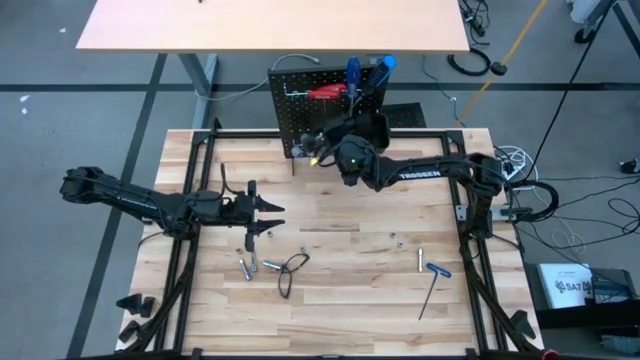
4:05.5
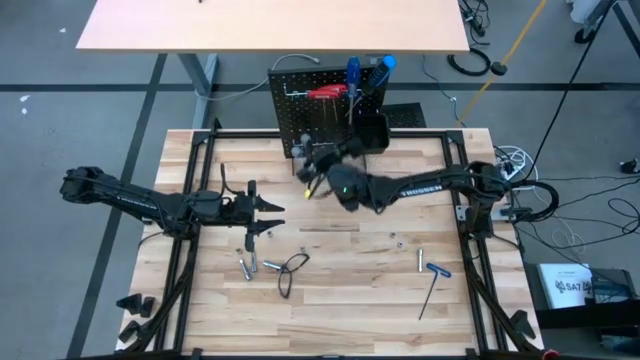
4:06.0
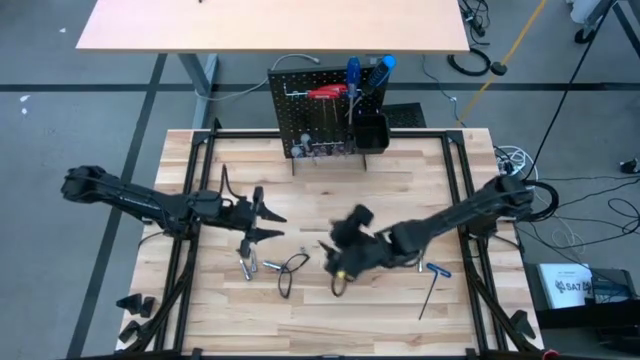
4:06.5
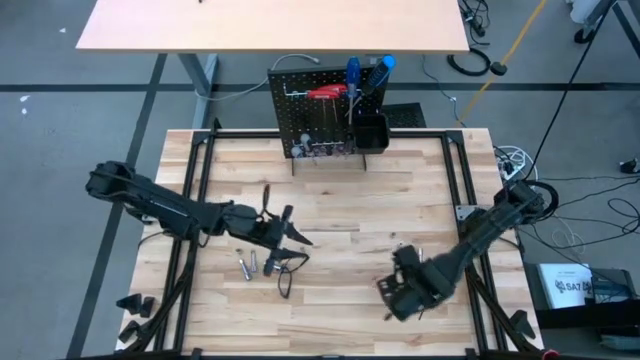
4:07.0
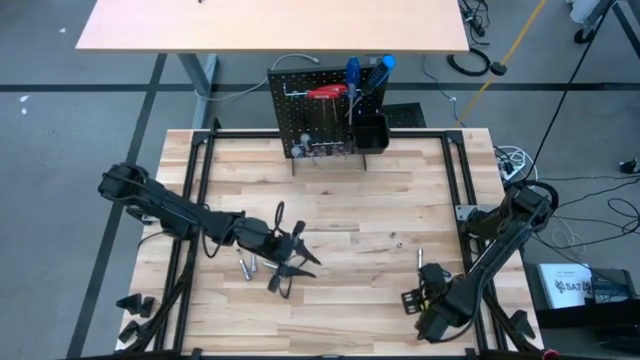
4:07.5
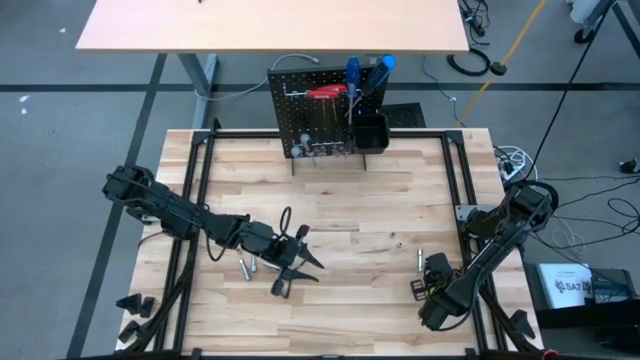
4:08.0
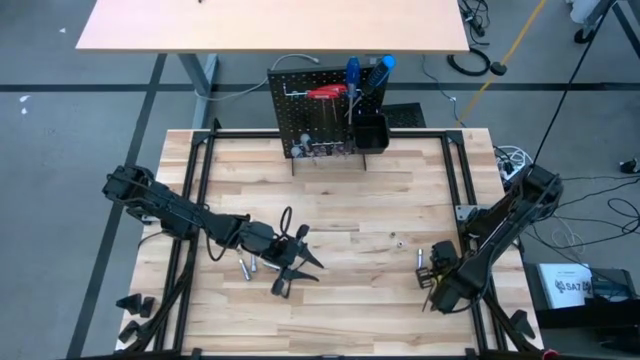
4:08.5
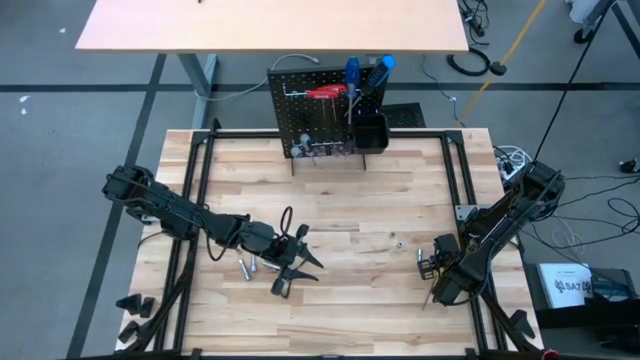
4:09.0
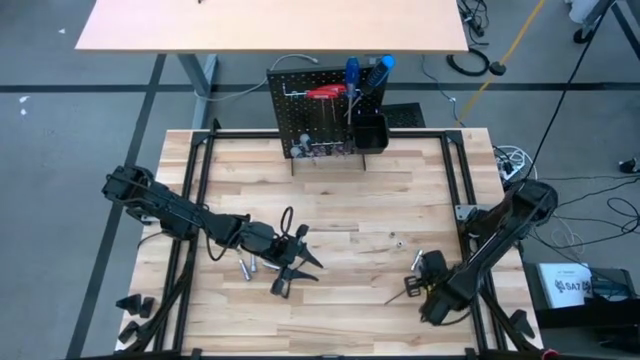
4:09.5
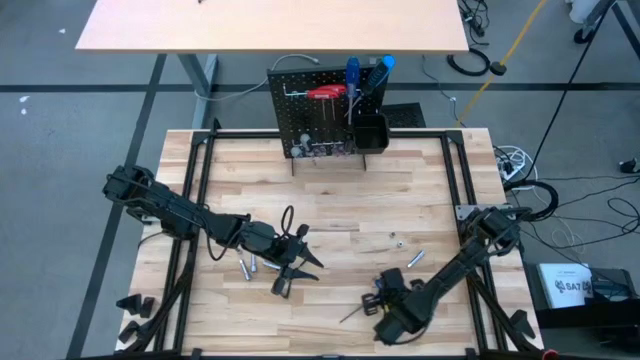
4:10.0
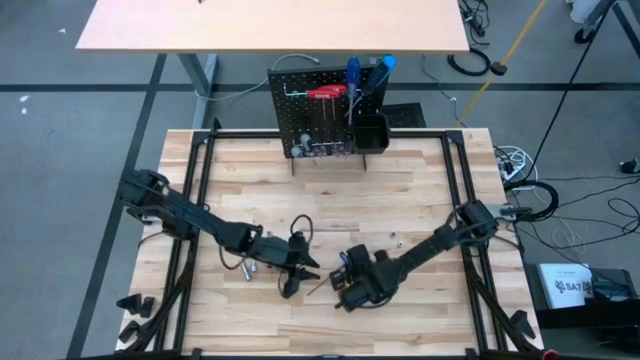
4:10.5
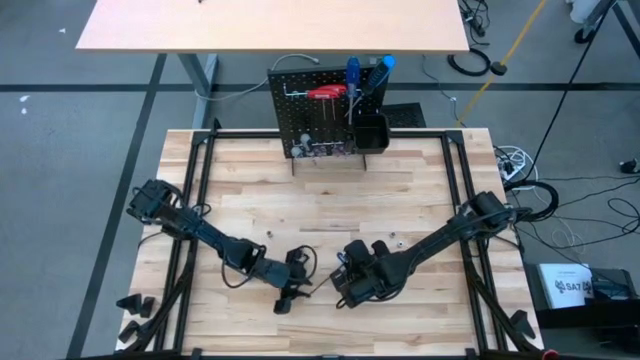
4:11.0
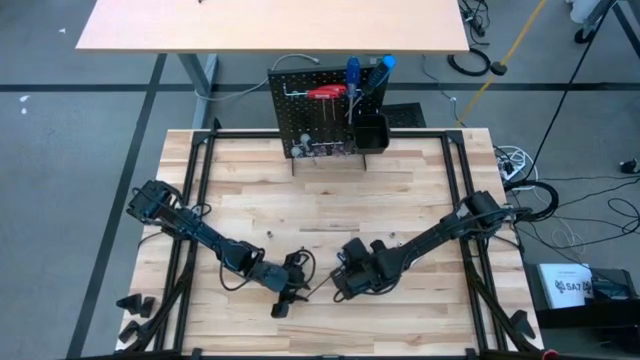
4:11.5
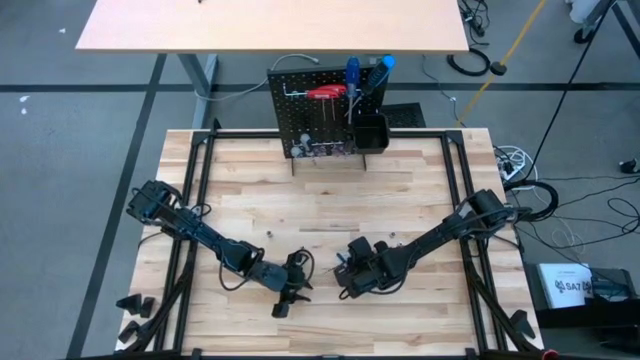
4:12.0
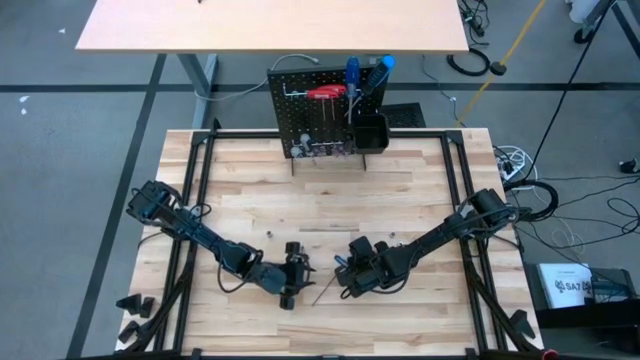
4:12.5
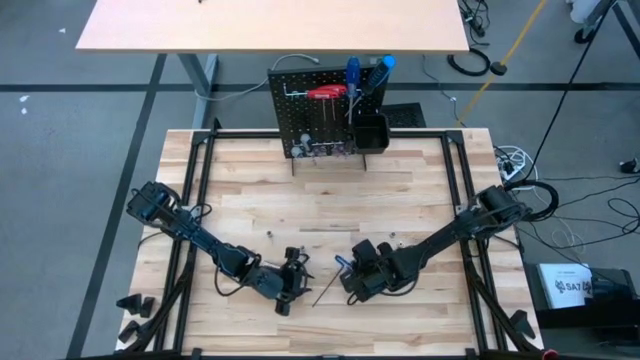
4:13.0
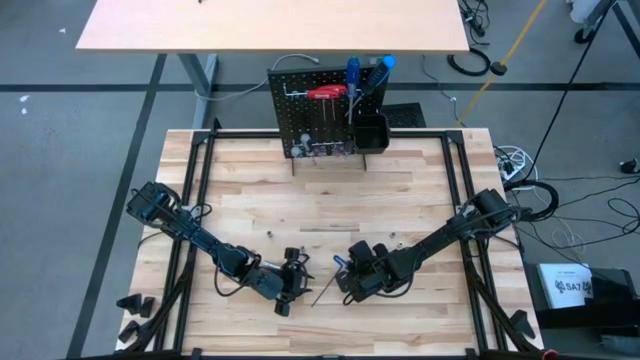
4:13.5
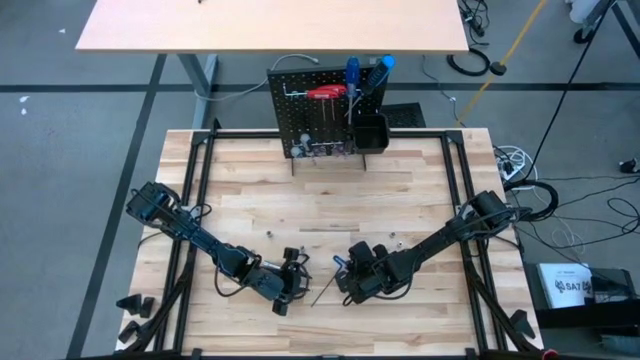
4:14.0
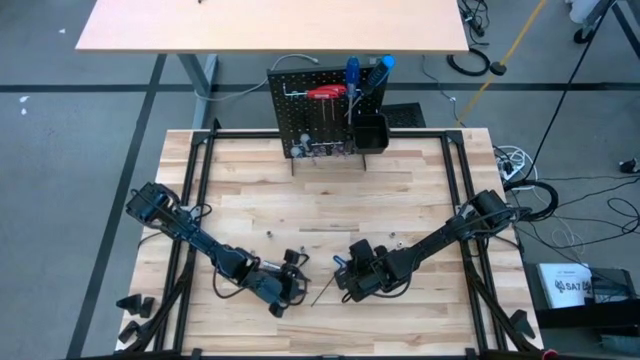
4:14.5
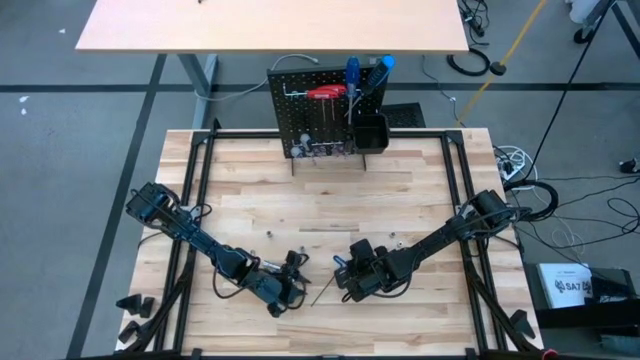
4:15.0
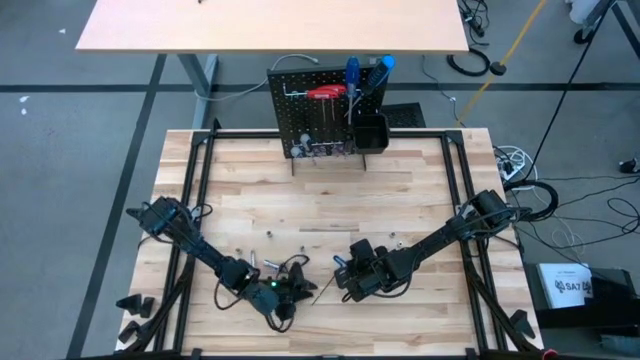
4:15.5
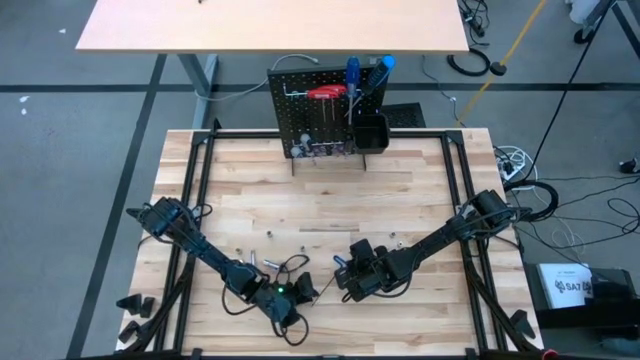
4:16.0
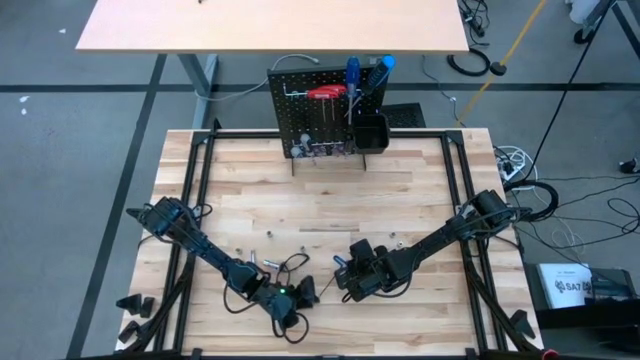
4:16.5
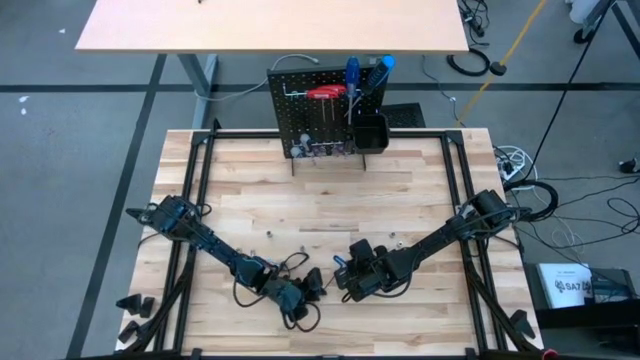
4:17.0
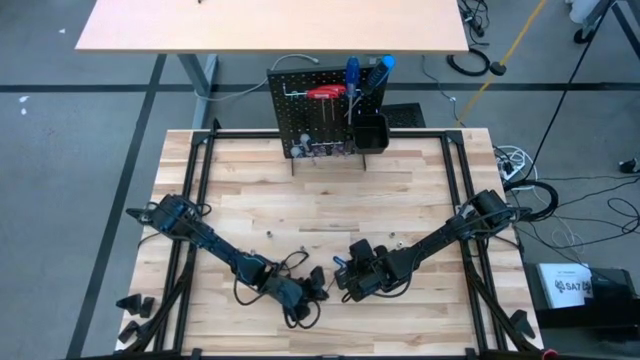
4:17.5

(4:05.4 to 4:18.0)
Task: Hang tools onto peg board
Hang the pick tool on the peg board

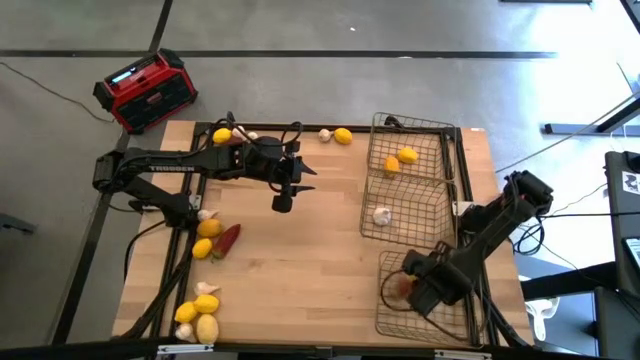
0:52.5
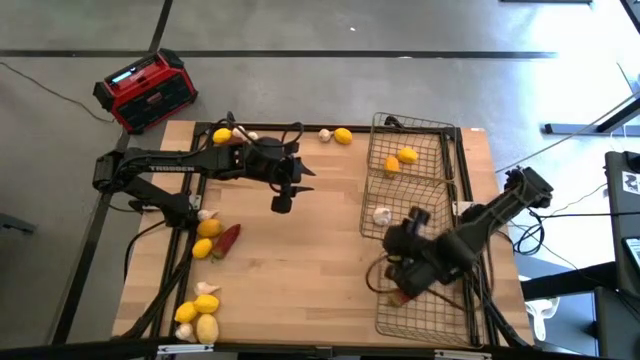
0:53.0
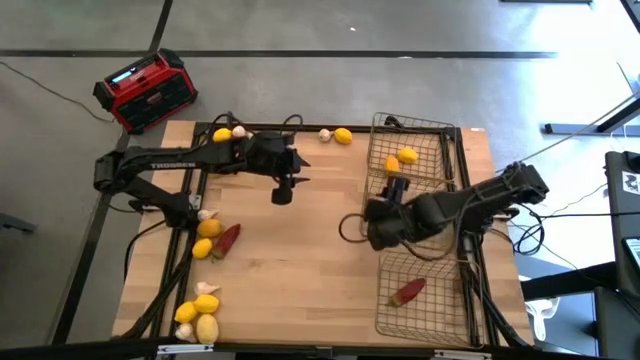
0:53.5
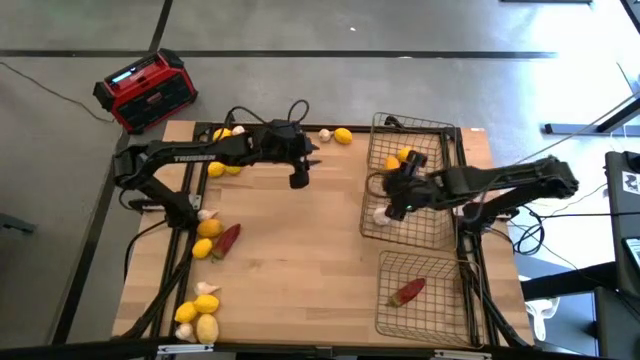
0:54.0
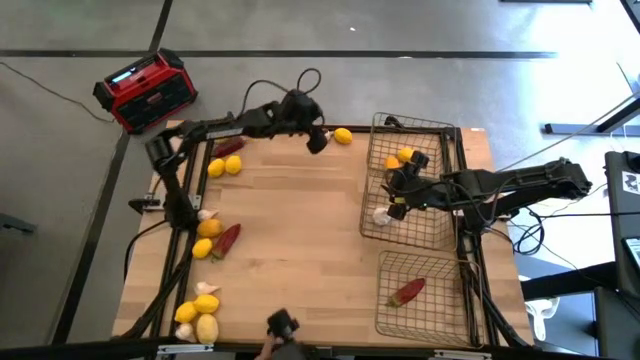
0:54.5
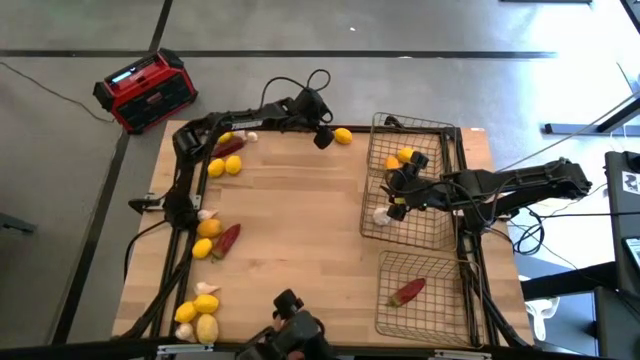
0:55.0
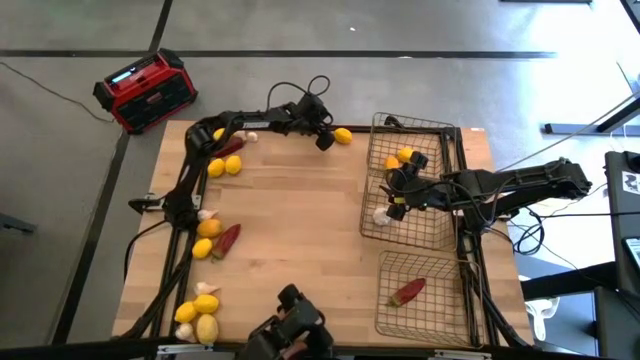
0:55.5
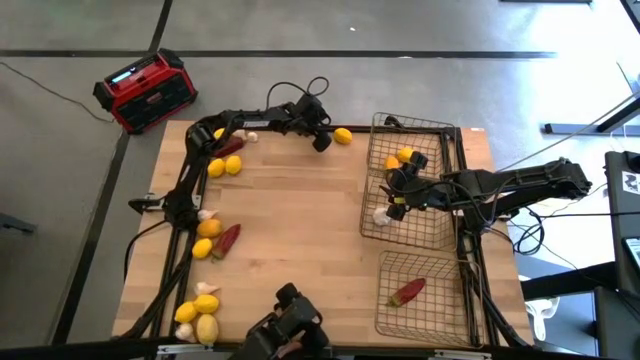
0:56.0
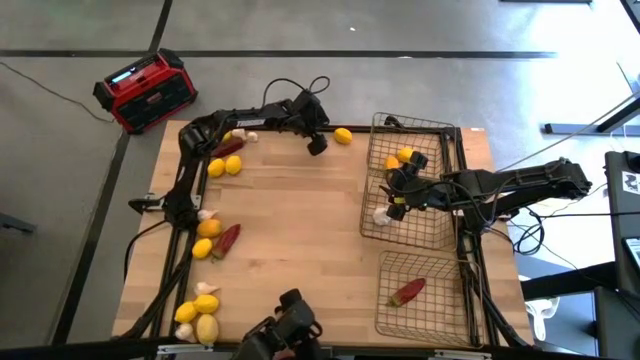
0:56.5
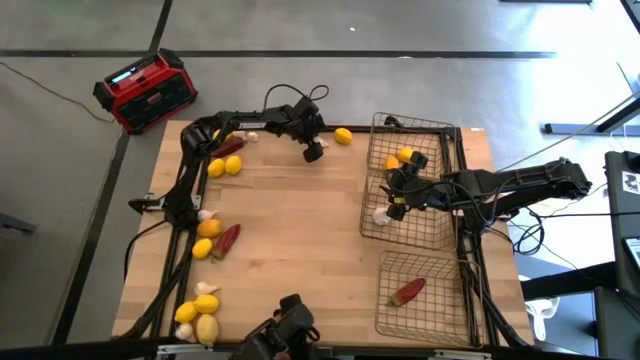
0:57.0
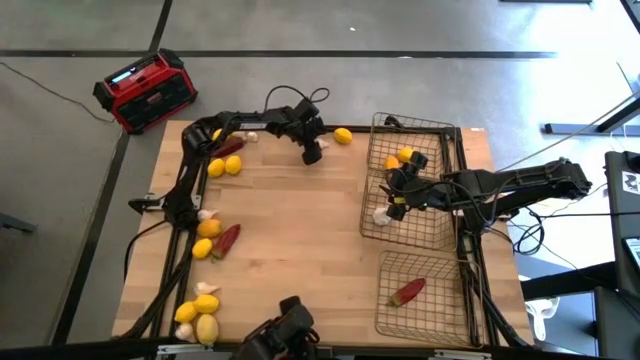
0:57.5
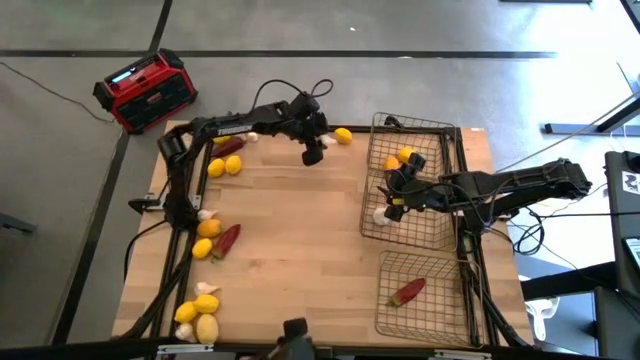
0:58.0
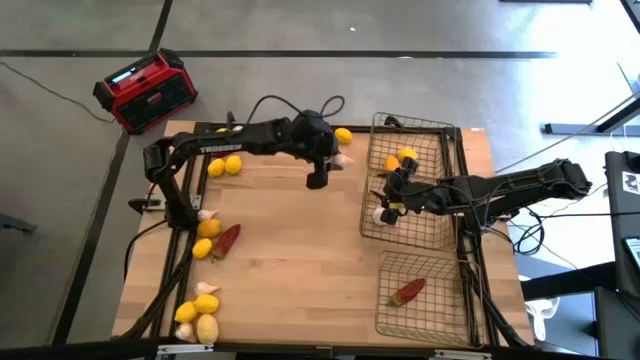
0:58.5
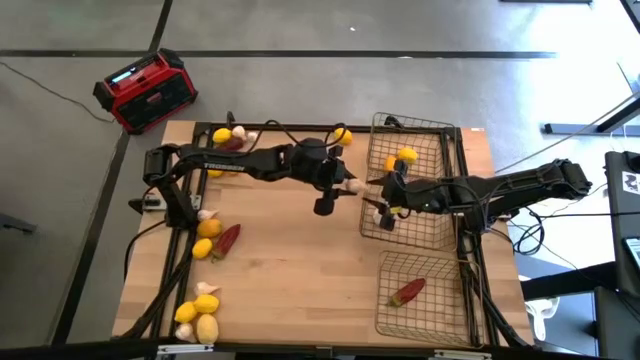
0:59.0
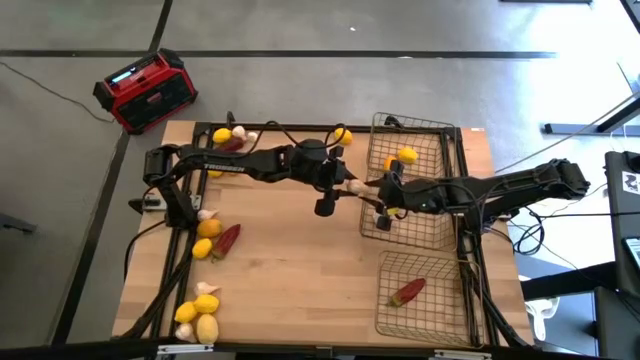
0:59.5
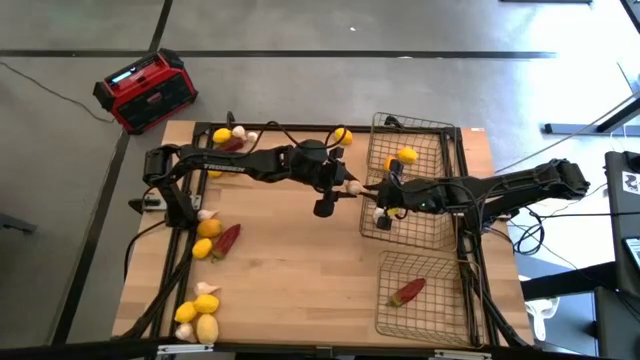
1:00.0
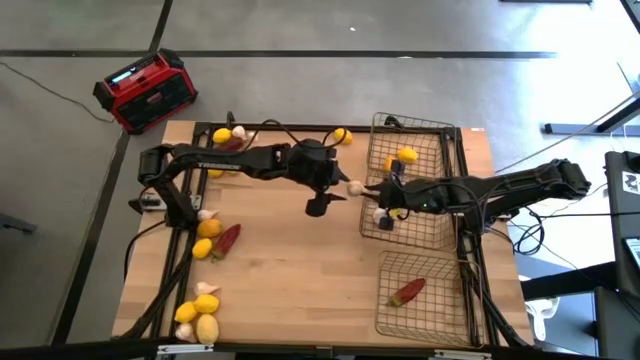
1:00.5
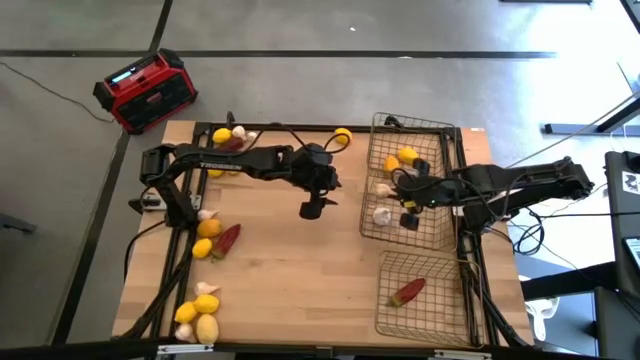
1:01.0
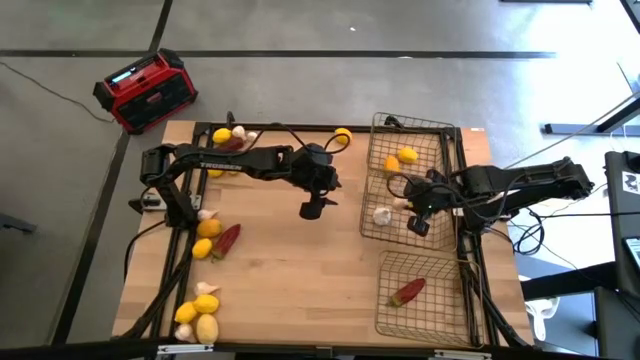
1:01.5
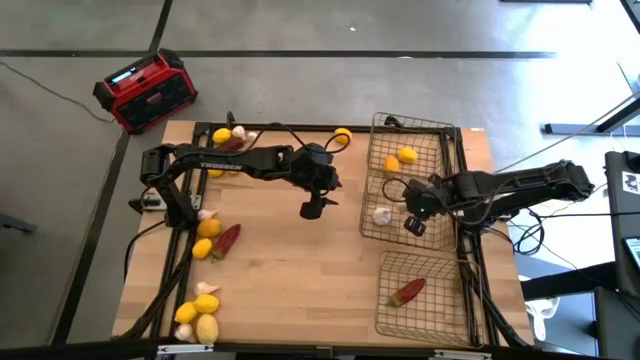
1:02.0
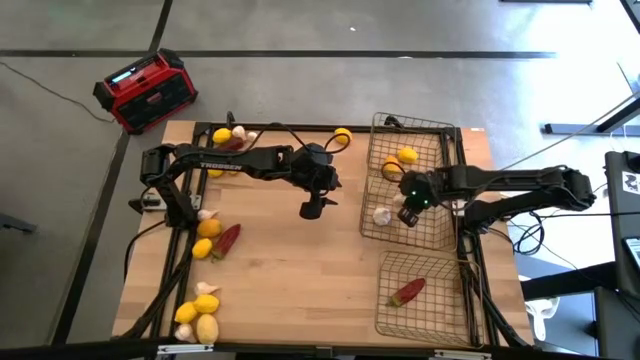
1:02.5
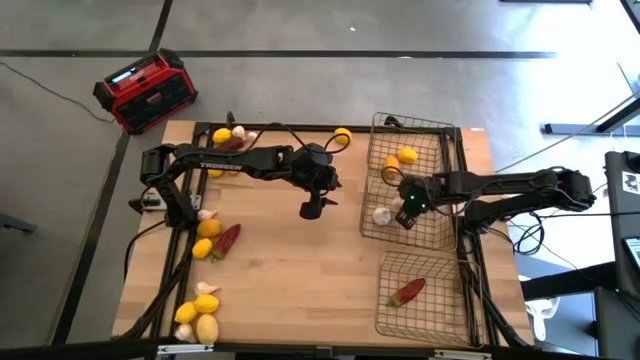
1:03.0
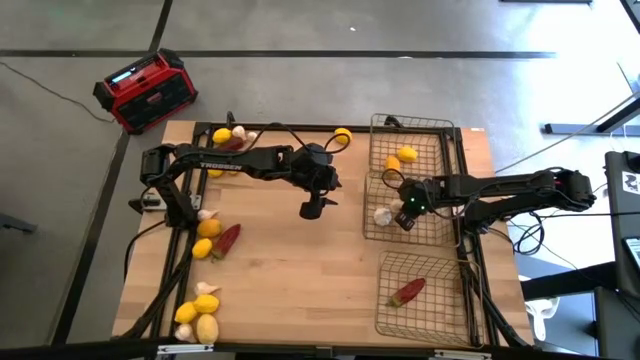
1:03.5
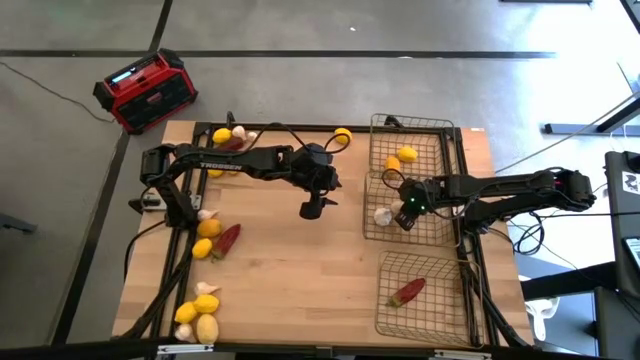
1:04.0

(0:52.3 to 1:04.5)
Task: Sort produce into baskets
Put the white garlic into the middle wire basket
